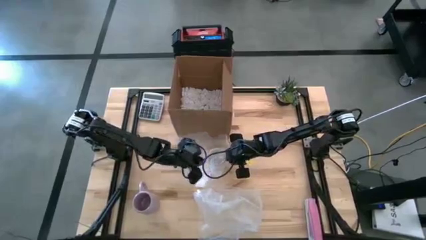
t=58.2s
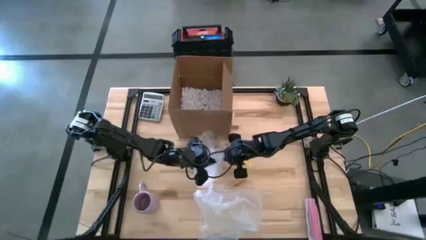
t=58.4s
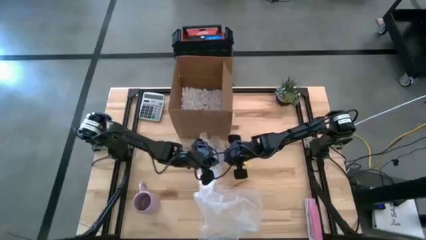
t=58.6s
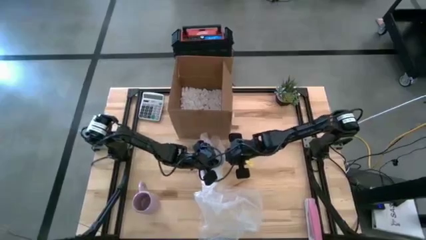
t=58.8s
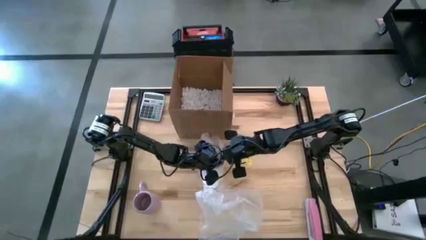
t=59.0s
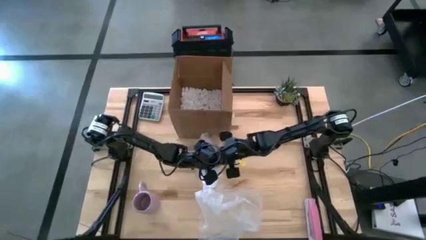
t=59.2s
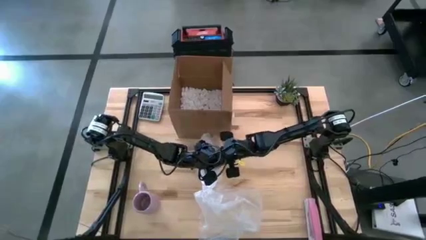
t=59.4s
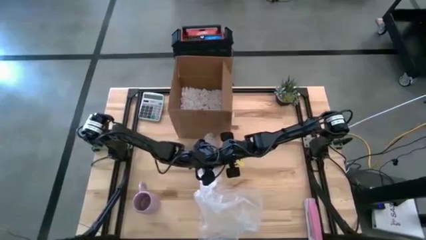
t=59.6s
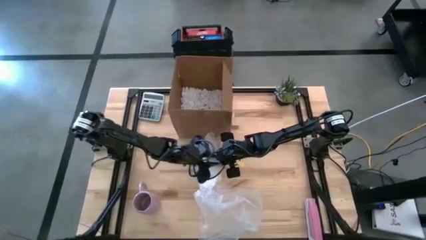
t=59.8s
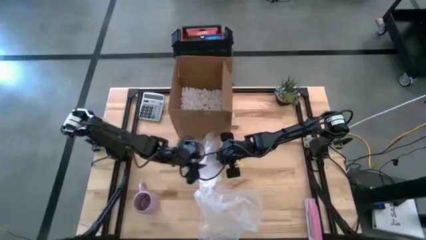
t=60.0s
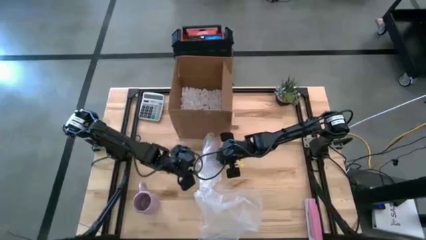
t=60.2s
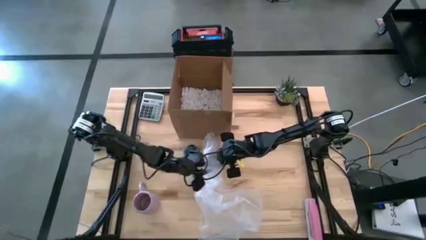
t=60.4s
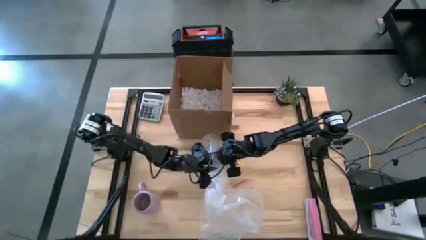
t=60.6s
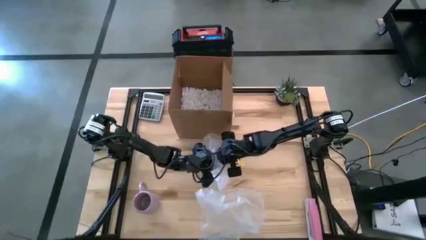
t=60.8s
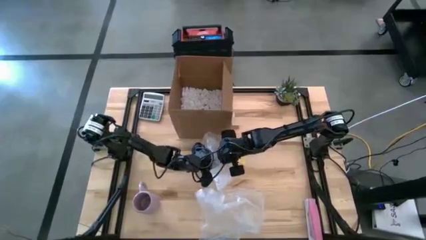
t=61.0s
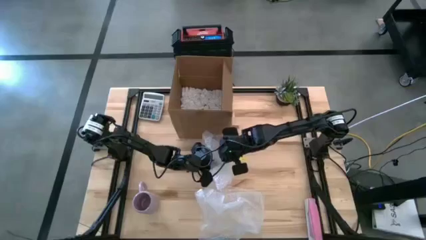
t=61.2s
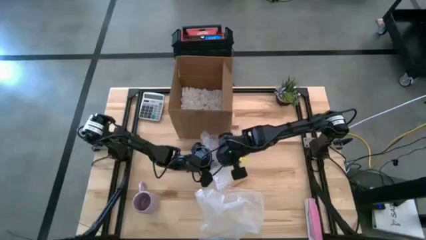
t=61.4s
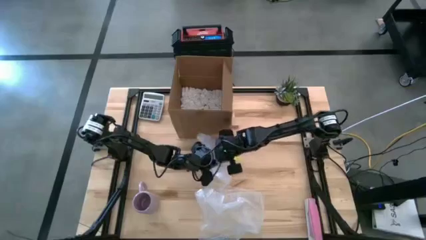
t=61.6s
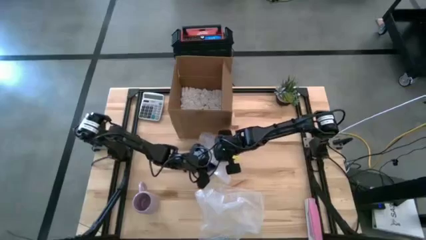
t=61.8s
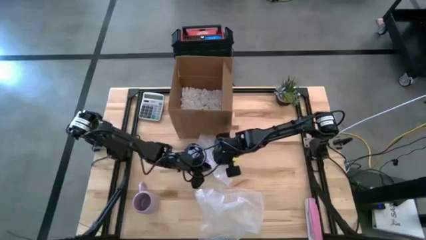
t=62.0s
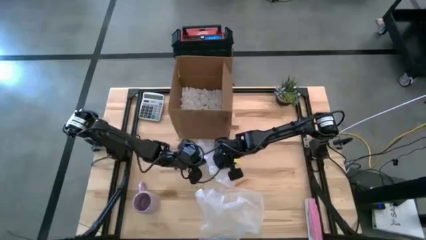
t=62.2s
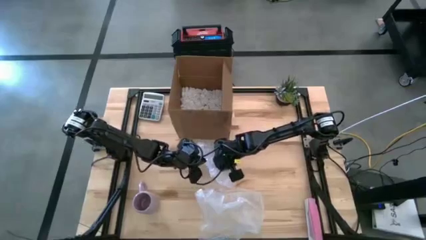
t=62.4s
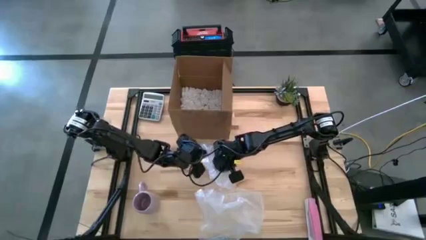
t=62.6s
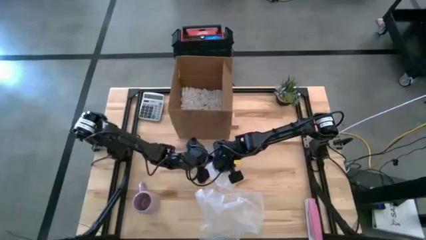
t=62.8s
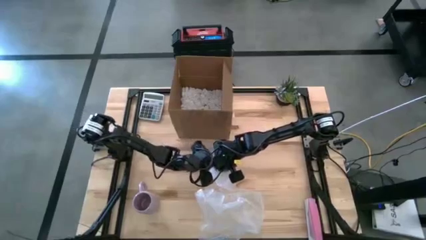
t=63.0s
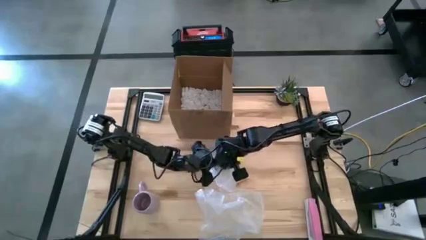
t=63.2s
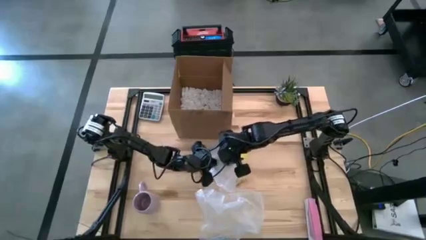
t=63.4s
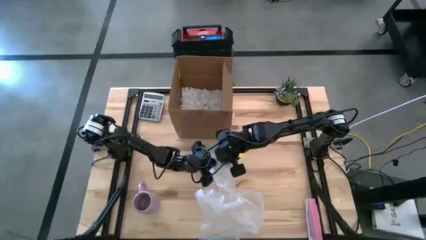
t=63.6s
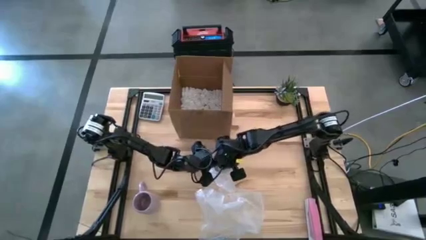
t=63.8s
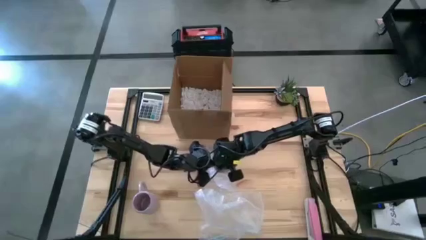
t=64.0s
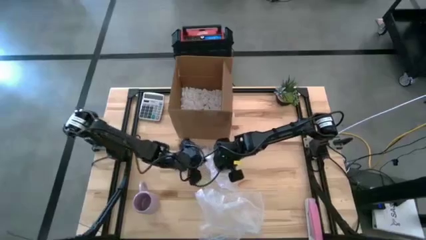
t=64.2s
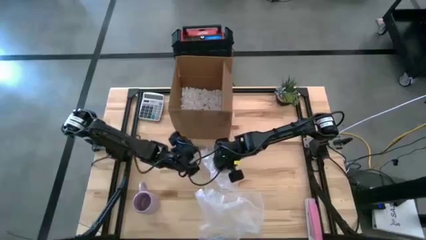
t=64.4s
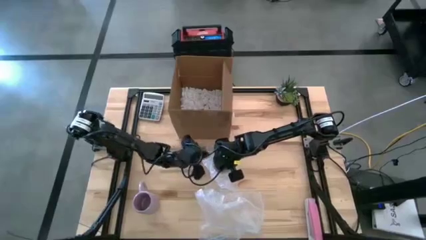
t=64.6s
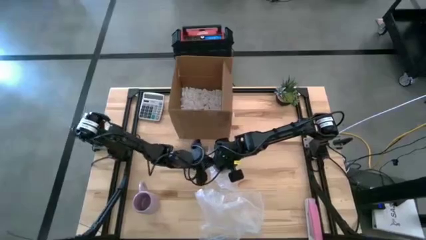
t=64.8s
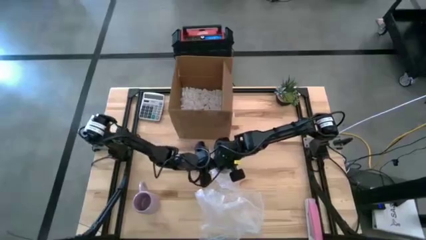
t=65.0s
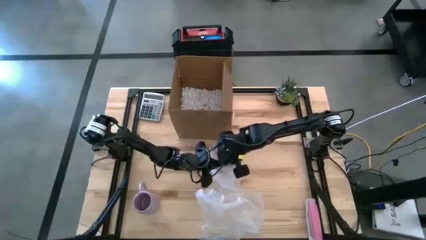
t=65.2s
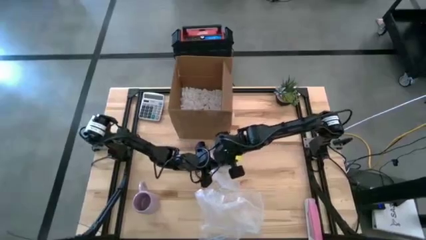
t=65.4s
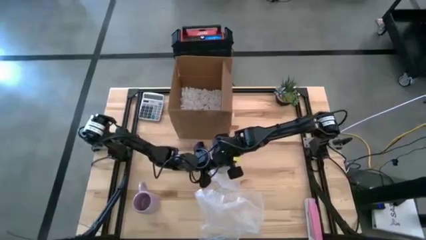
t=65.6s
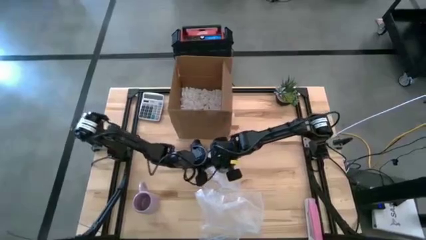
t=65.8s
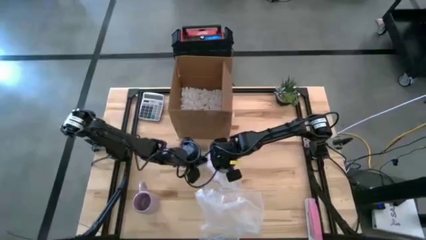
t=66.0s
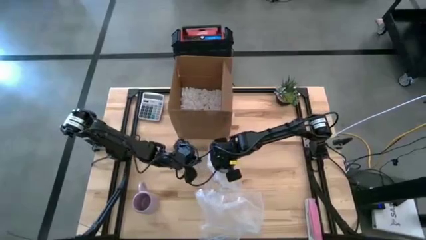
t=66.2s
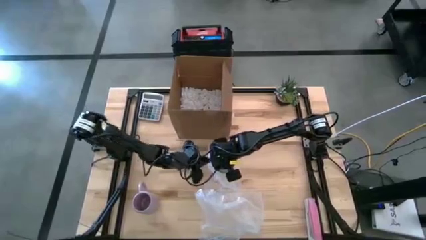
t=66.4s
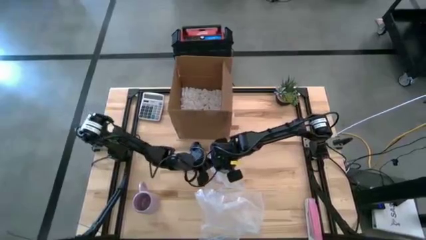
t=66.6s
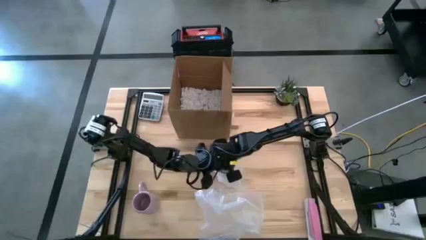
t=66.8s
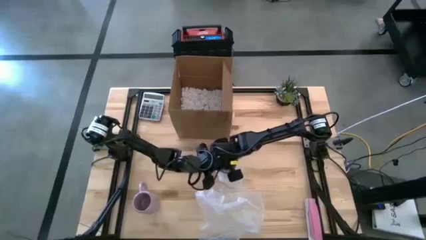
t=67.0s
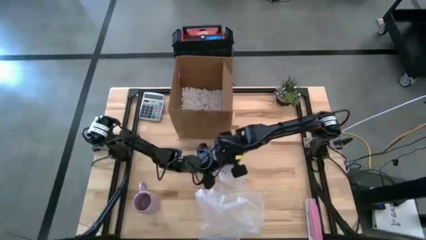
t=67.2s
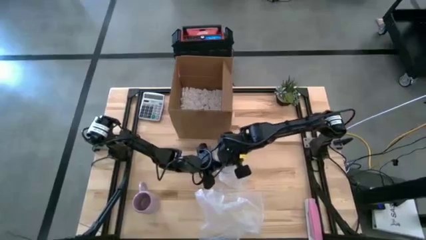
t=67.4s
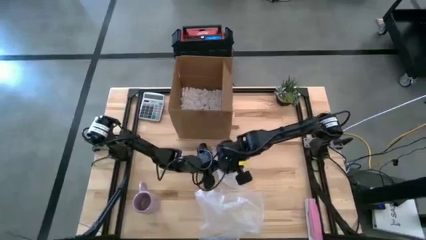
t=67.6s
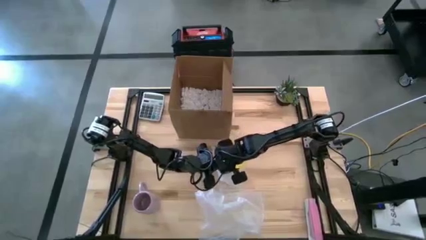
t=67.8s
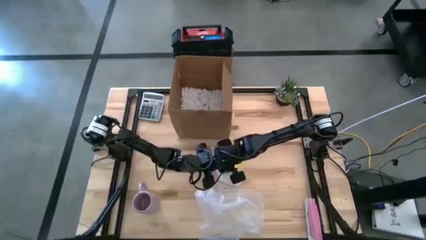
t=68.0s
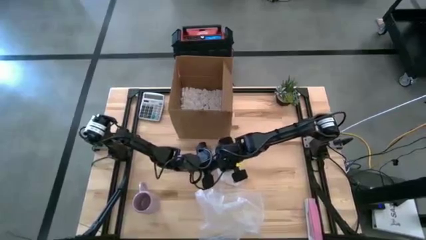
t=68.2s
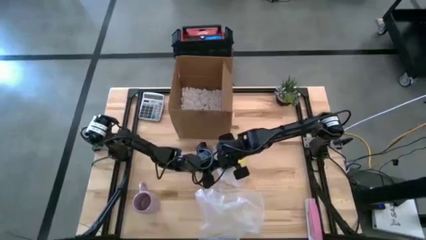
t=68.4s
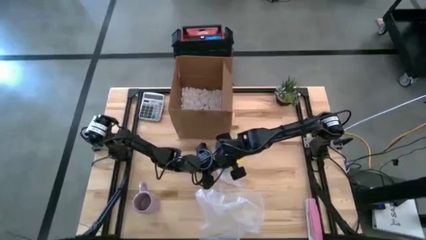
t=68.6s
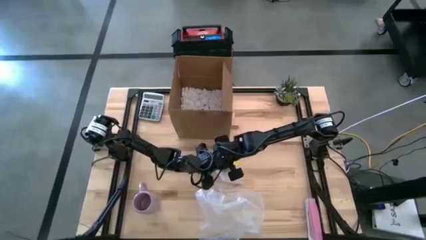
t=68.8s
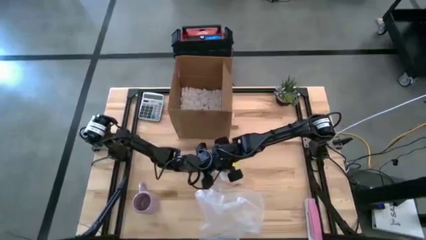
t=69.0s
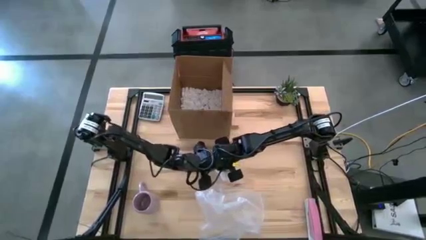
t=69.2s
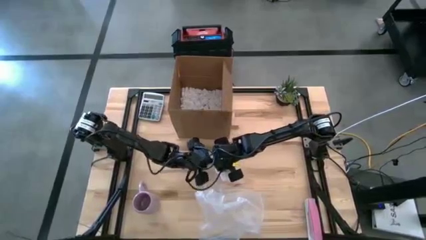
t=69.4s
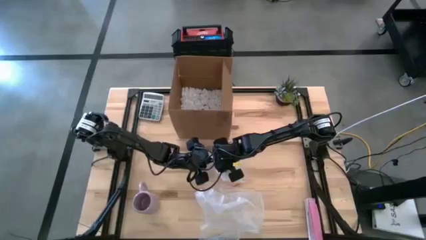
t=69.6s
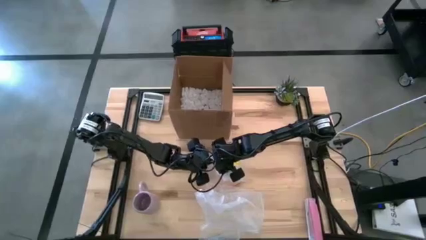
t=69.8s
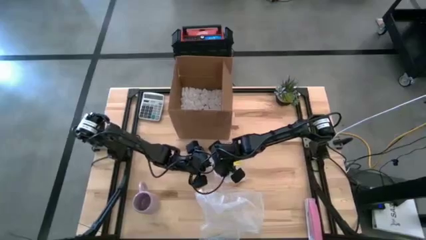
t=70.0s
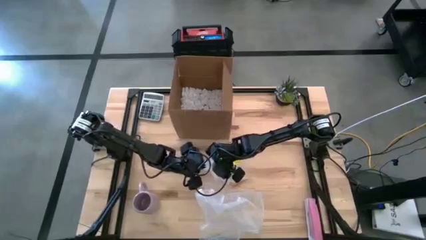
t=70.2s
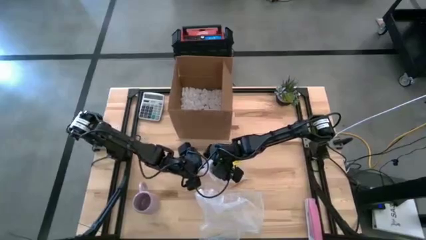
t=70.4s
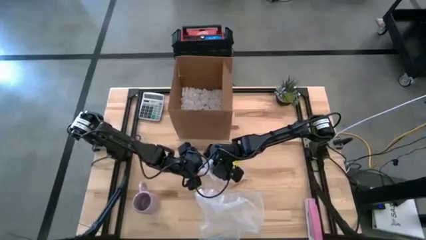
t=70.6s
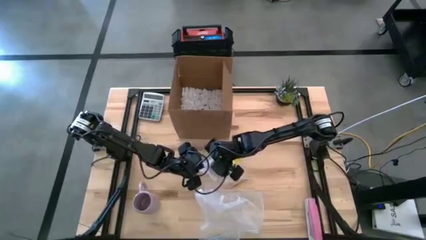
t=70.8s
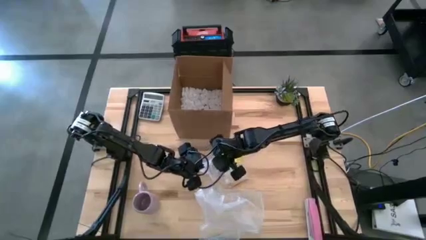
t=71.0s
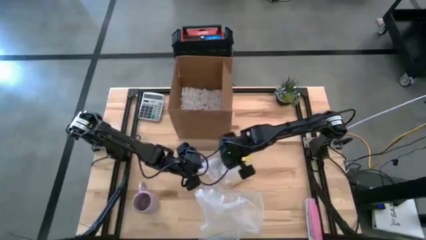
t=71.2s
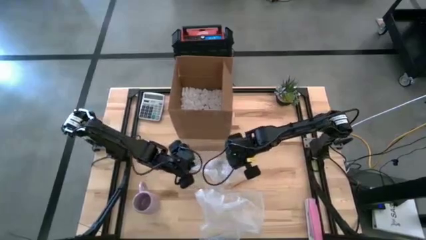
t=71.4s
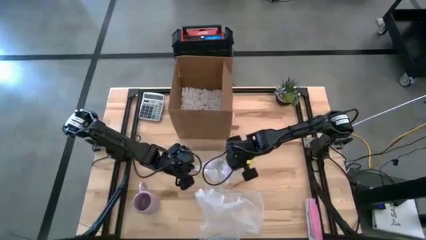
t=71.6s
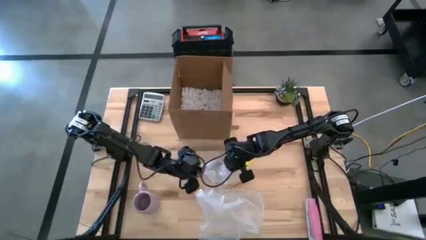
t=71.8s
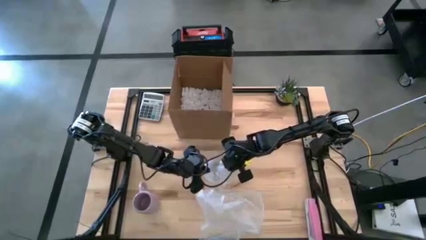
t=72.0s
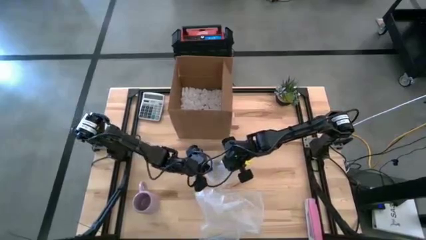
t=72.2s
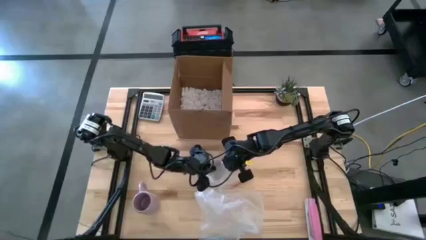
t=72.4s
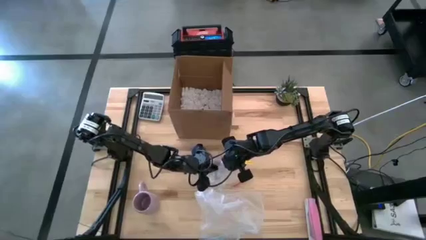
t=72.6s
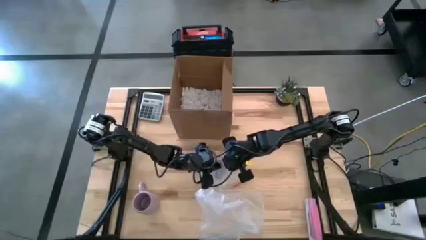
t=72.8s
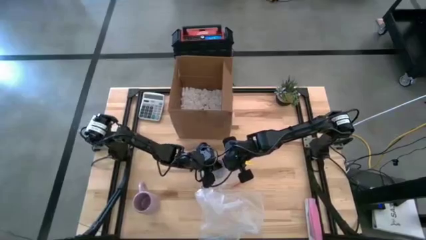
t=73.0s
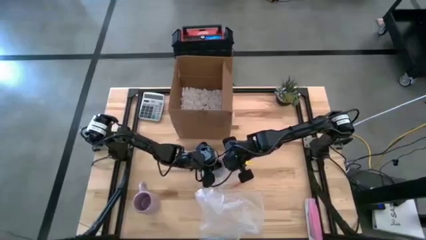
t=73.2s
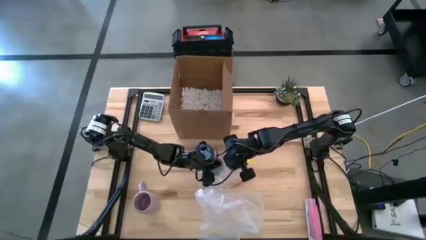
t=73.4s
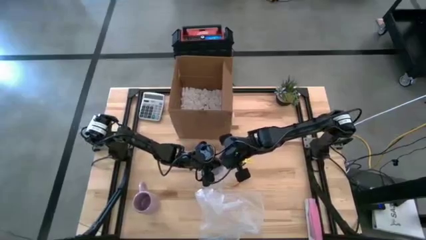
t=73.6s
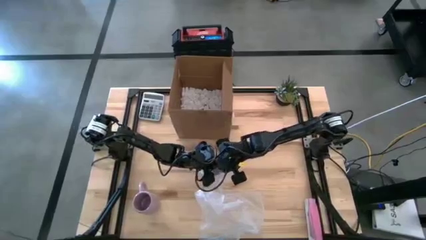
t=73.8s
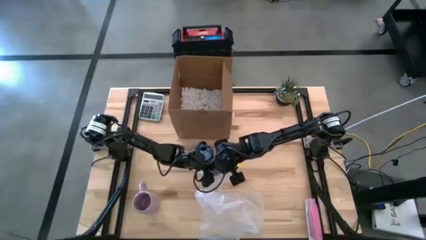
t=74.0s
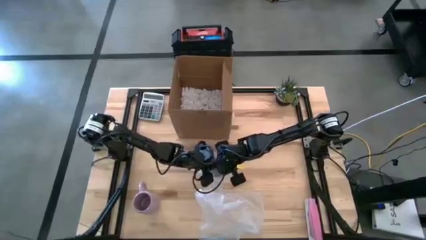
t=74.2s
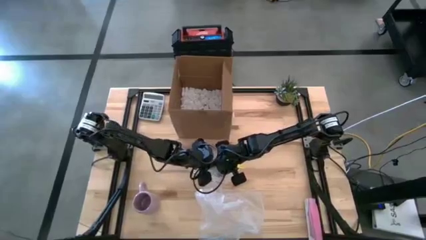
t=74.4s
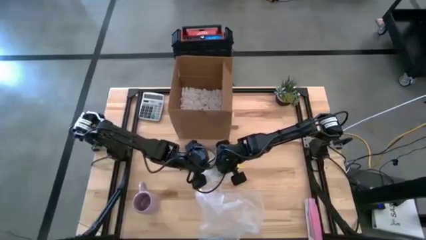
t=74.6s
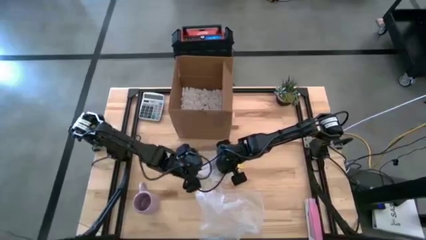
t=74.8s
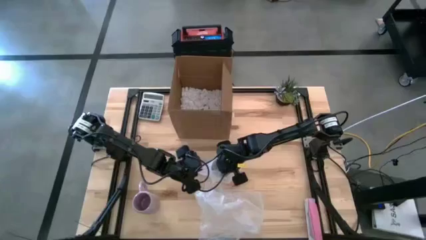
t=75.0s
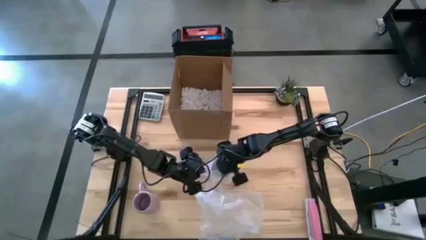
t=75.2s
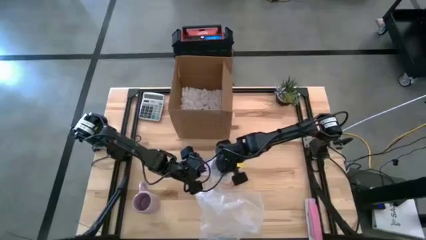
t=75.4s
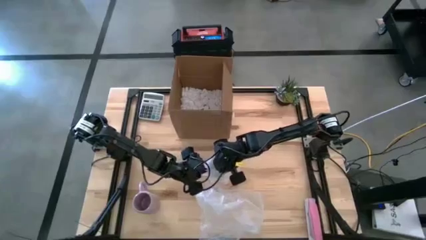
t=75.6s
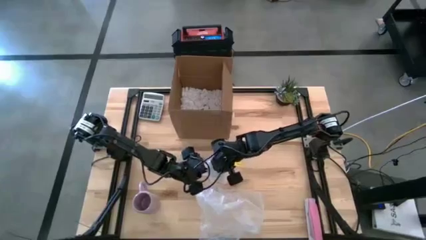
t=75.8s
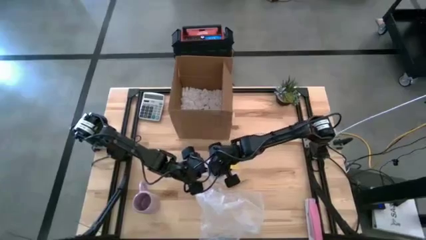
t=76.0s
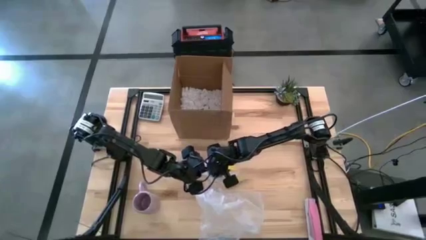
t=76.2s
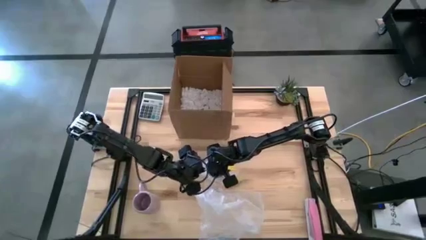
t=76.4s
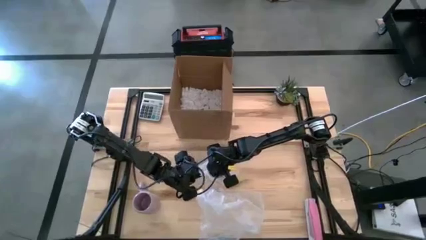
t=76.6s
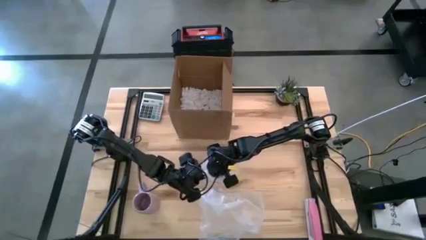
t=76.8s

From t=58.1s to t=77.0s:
Task: wrap mug
Wrap the white mug with the bubble wrap
